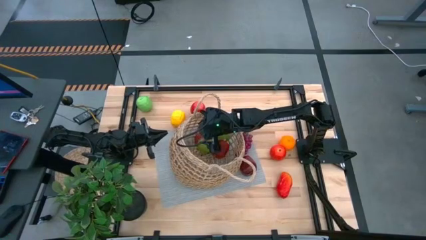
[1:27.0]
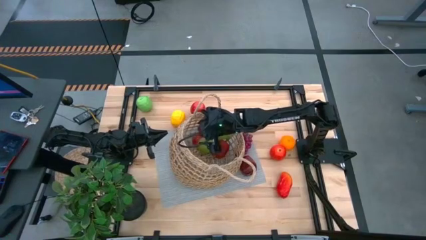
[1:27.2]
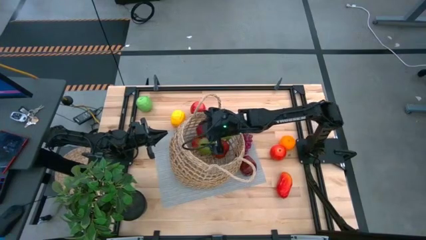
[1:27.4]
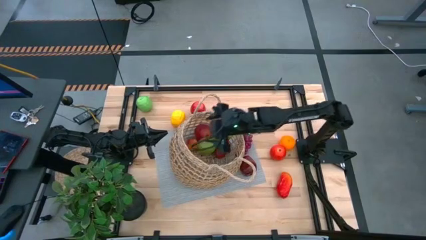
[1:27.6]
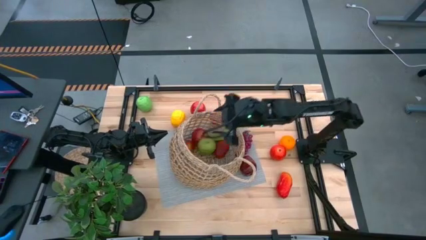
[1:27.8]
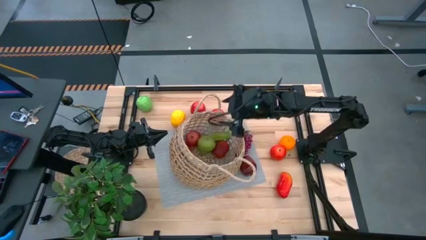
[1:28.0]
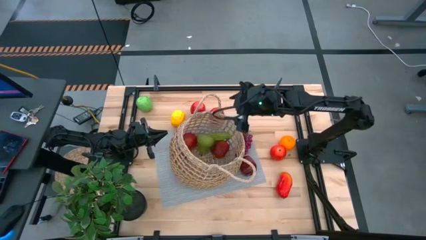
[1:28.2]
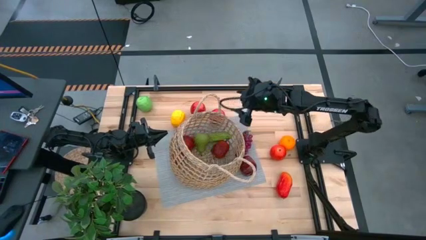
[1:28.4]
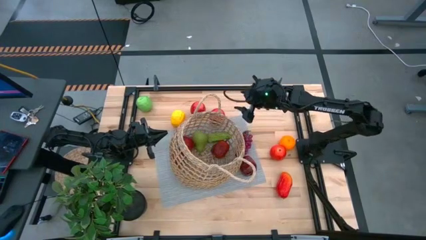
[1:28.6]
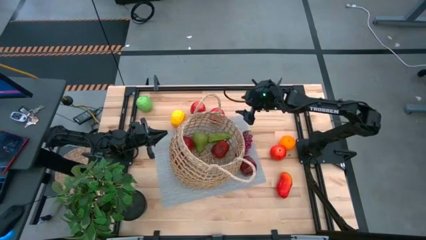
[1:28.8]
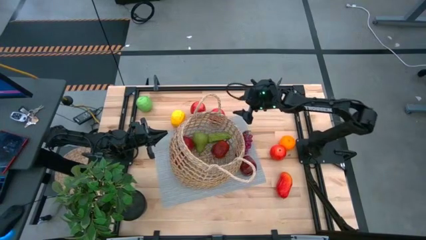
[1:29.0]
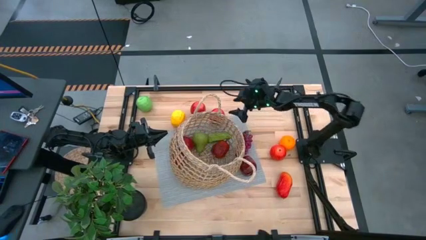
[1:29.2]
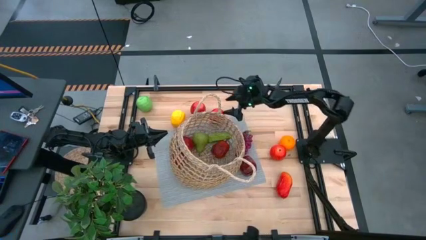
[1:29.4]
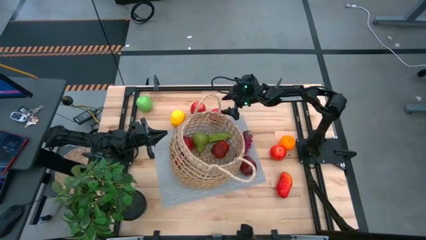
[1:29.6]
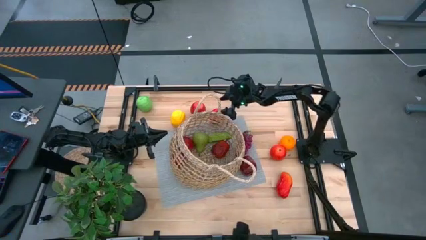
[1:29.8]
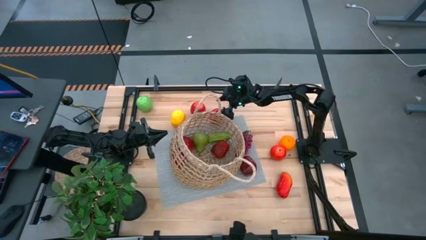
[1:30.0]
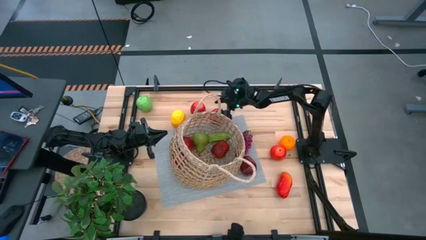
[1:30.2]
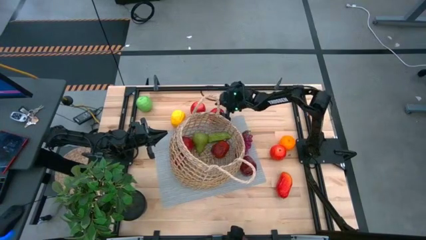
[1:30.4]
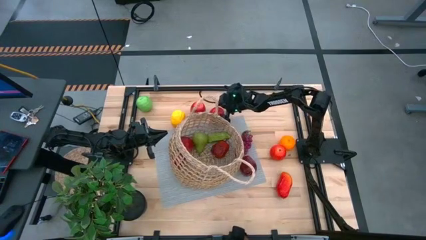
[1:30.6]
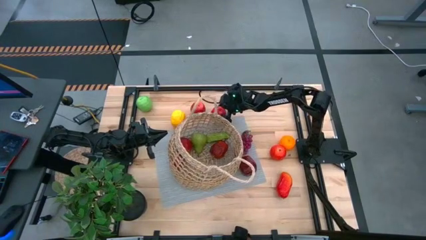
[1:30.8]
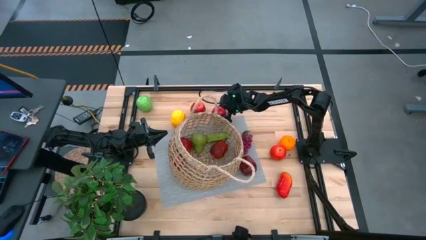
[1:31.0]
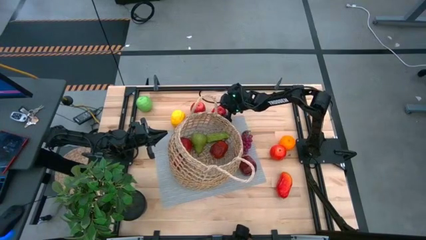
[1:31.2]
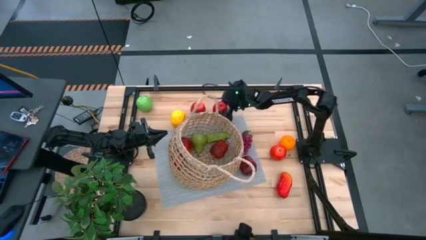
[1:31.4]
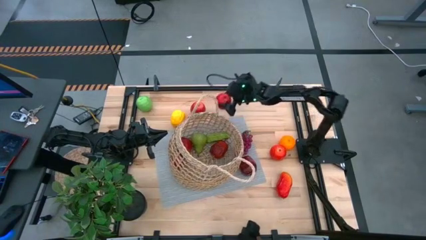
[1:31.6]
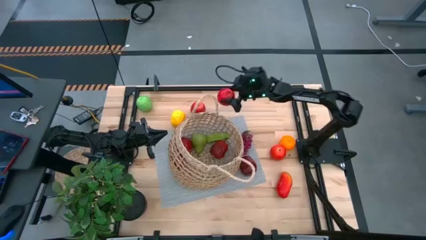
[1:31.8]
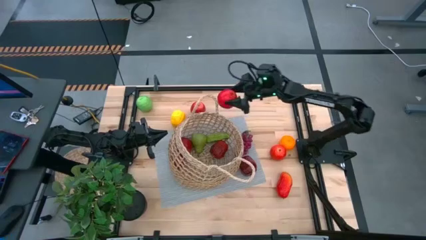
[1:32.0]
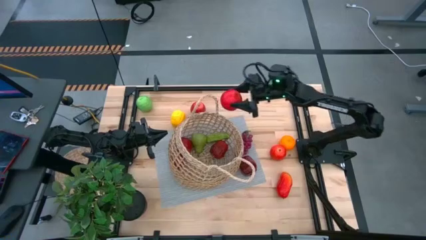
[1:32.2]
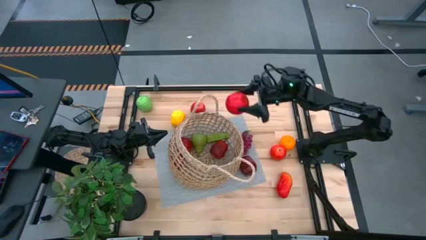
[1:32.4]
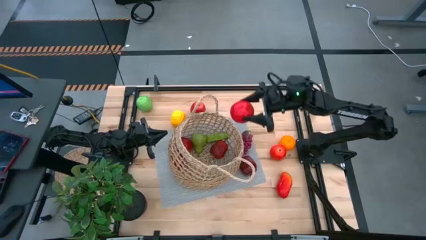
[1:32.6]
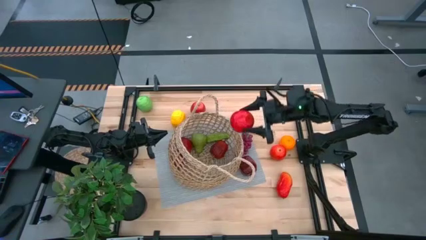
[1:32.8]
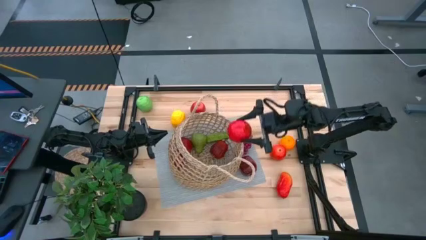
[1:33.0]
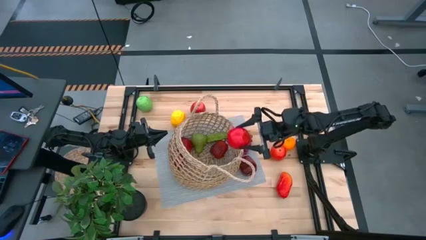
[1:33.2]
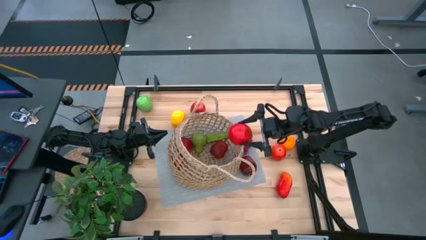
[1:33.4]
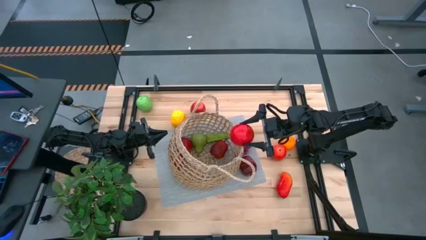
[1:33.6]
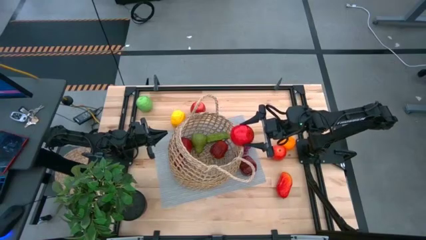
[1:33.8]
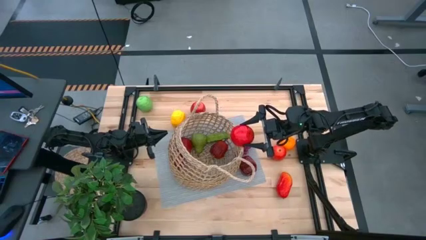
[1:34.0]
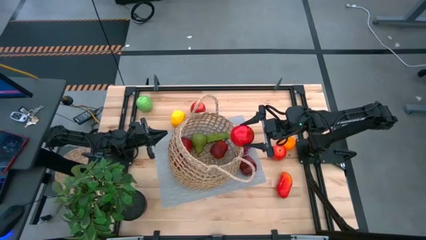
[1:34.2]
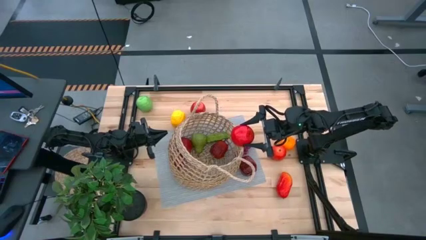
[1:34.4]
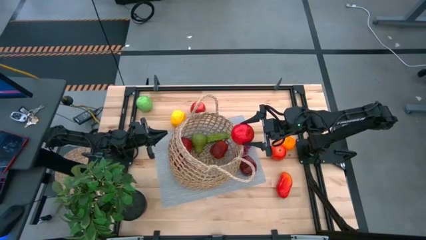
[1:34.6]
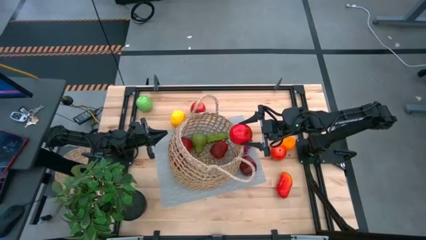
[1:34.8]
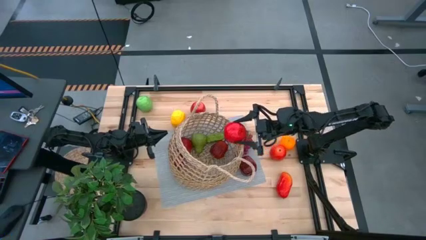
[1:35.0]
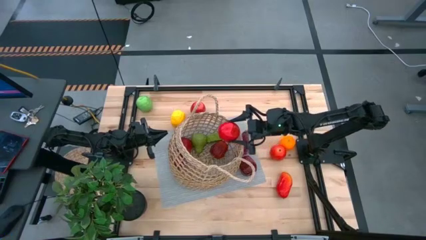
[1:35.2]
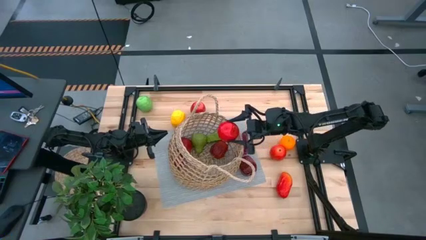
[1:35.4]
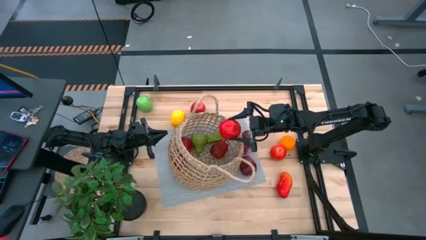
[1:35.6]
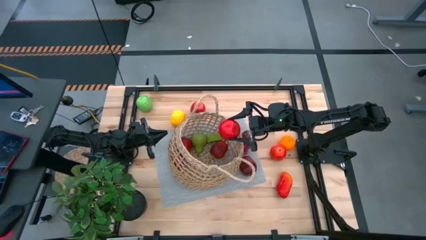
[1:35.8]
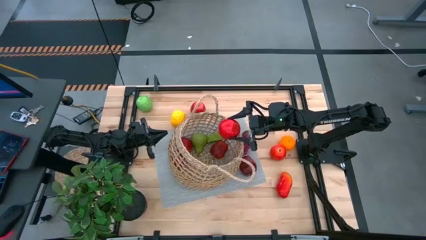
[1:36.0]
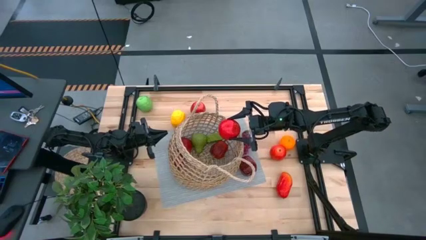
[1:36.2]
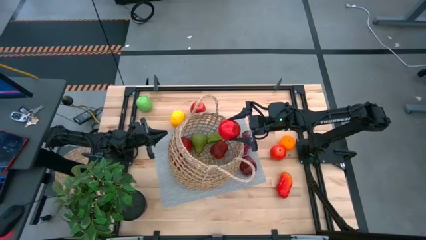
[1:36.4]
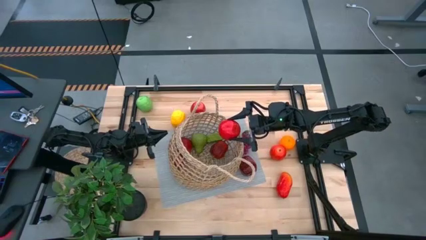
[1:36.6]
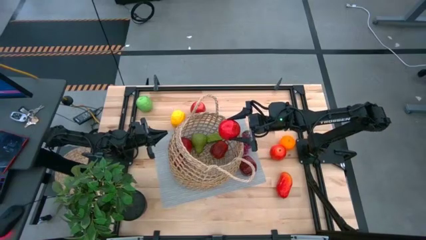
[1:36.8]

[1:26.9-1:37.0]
Task: Build produce basket
Put the red apple into the basket

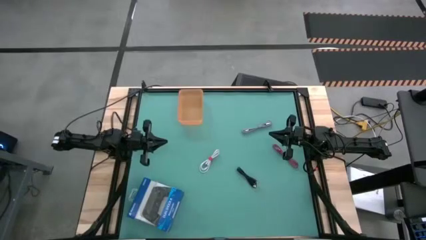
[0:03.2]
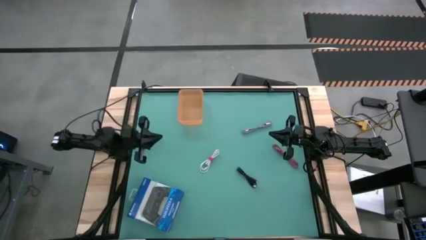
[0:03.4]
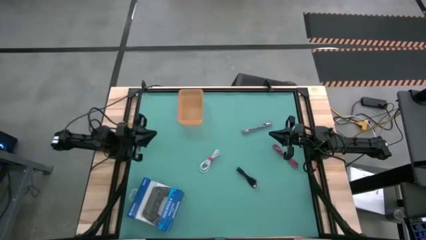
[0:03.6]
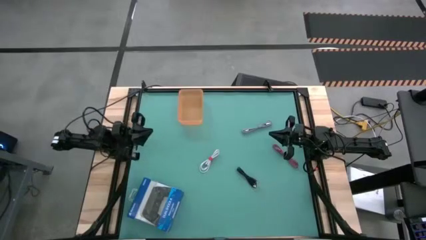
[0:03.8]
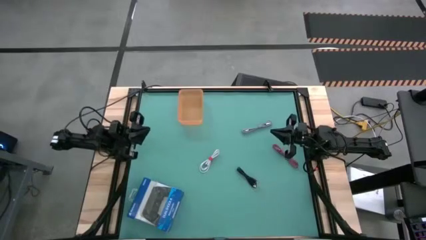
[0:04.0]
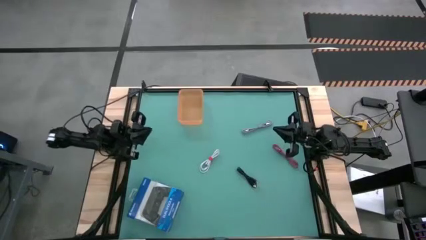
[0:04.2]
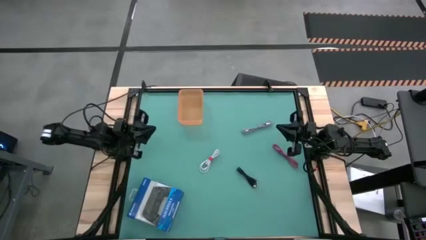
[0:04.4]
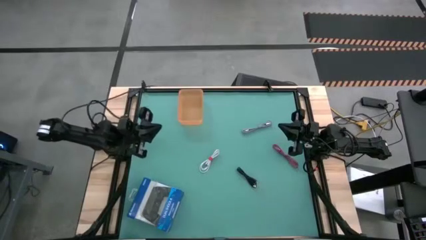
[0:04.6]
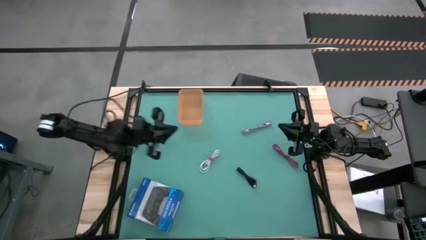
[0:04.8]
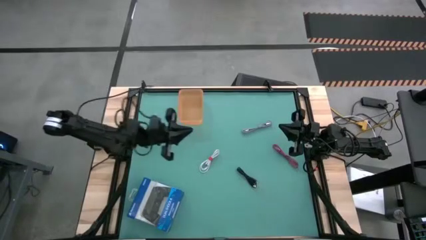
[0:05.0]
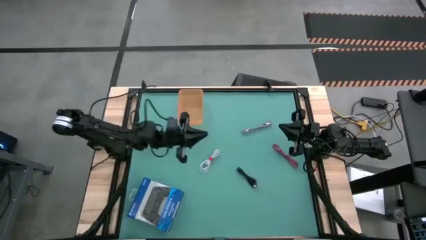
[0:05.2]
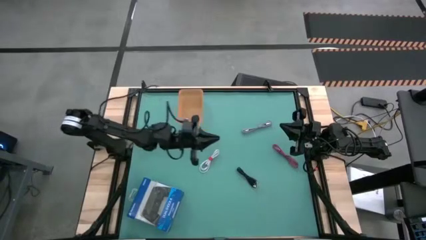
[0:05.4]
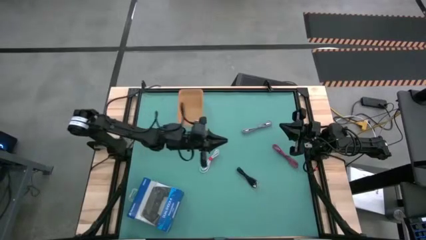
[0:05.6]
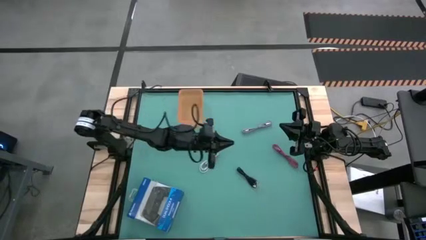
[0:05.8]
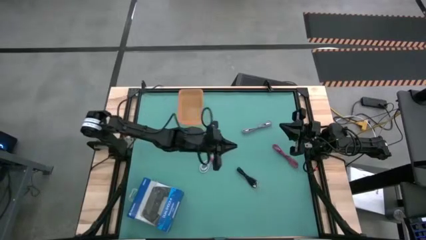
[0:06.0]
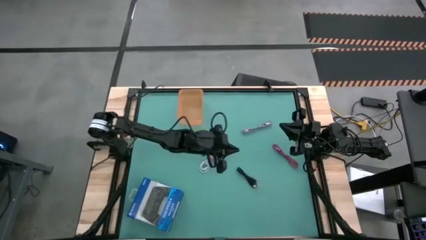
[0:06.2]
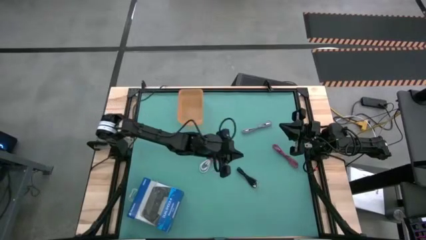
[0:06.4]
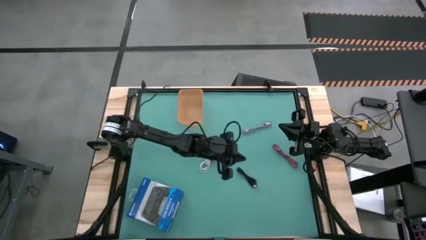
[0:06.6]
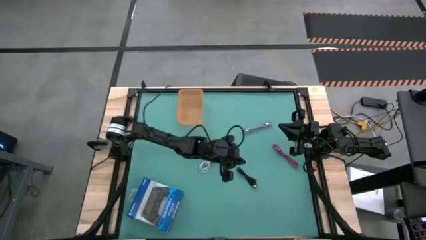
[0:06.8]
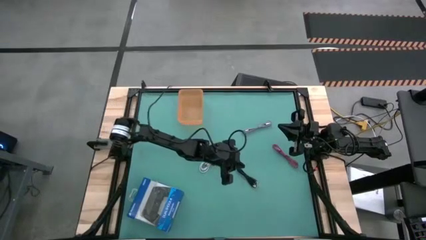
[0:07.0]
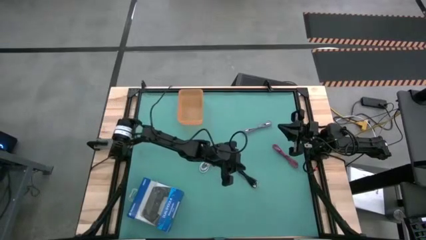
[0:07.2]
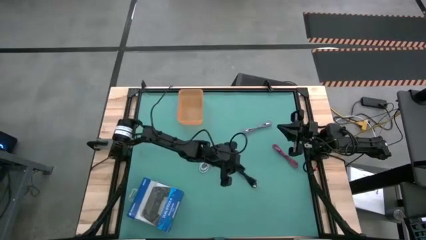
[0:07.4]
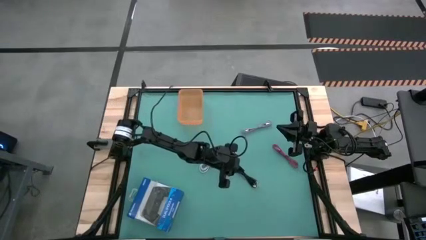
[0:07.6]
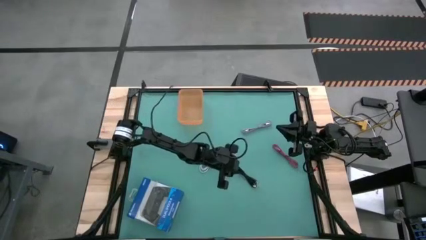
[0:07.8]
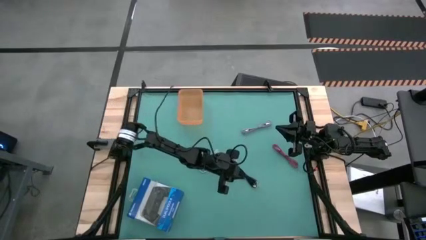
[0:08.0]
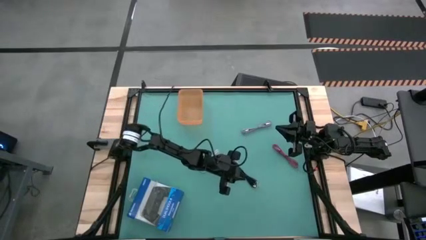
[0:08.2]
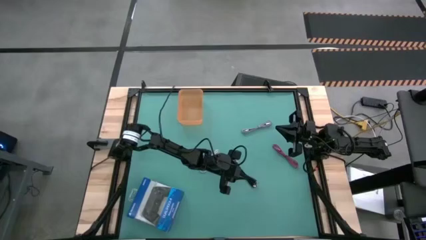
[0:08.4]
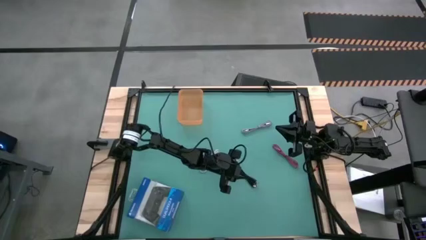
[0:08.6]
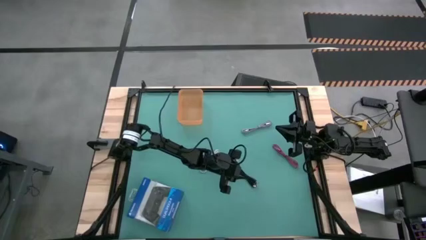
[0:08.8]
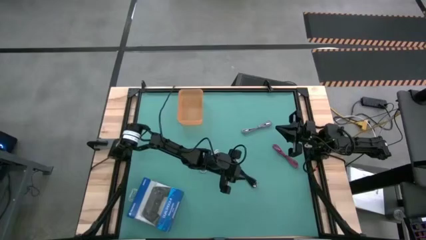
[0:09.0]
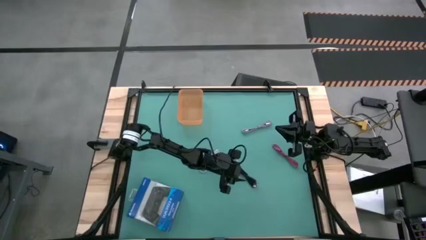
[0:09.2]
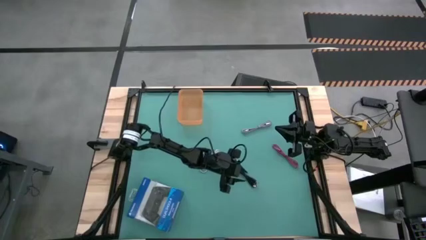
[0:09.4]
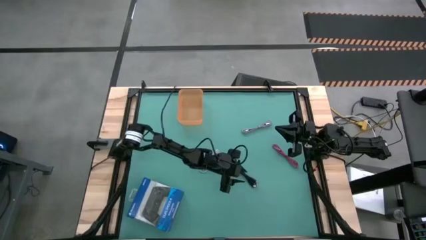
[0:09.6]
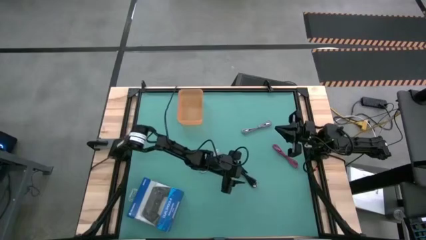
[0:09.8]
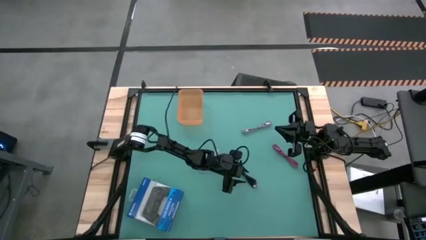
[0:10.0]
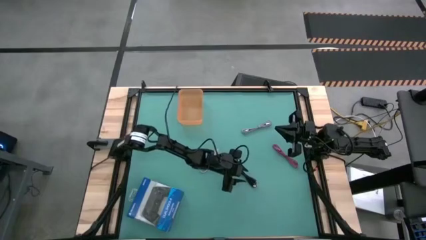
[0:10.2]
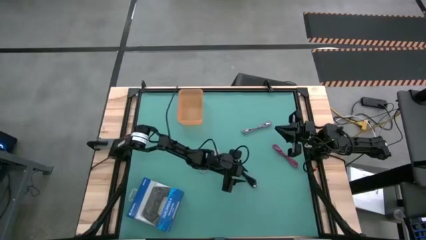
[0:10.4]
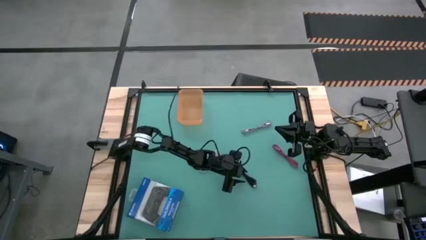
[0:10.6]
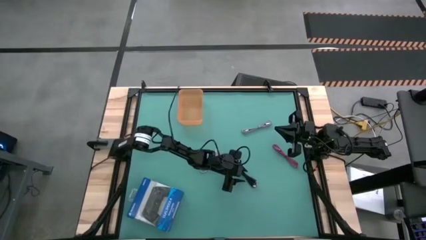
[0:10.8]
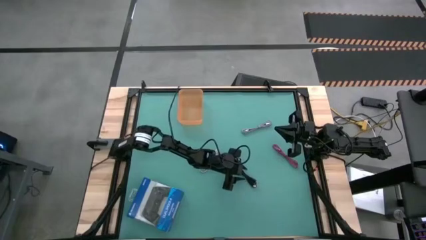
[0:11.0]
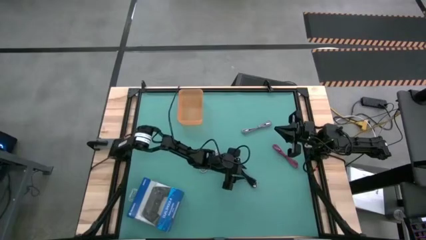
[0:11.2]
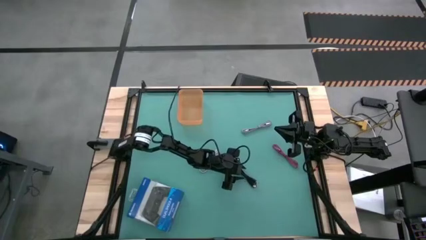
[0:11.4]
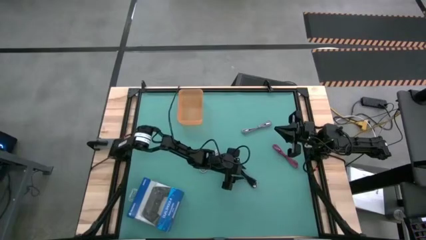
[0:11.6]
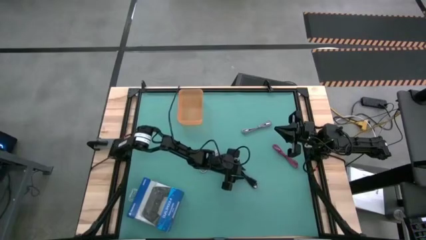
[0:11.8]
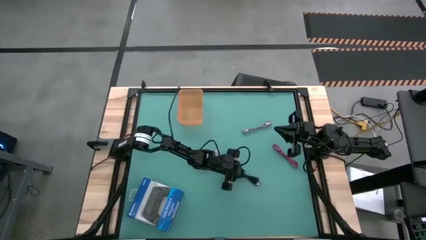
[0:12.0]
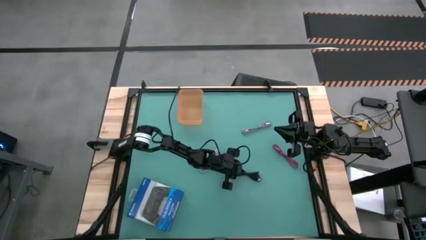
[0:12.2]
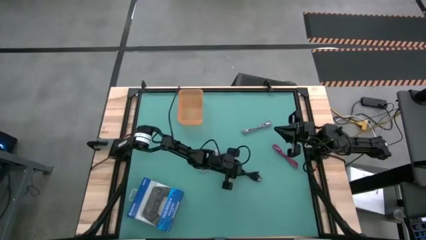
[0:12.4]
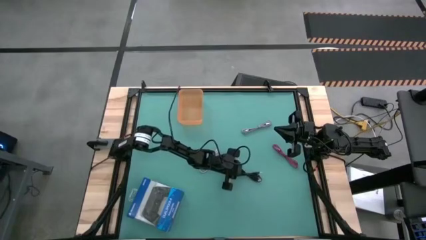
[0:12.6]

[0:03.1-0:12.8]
Task: Pick and place USB-C Cables
Put the black charger cable into the orange bin
